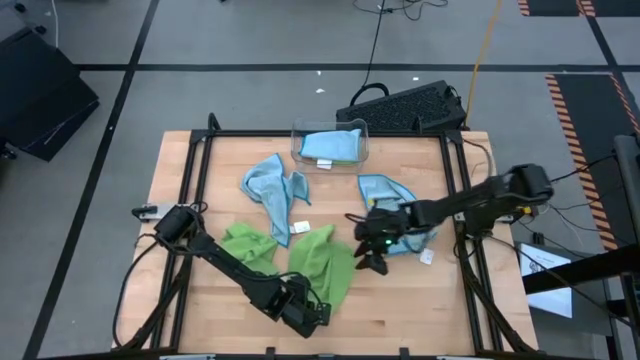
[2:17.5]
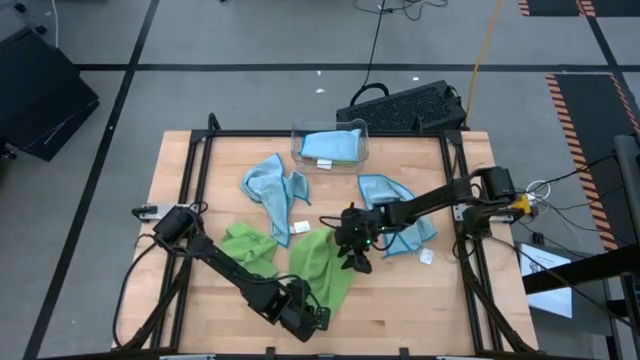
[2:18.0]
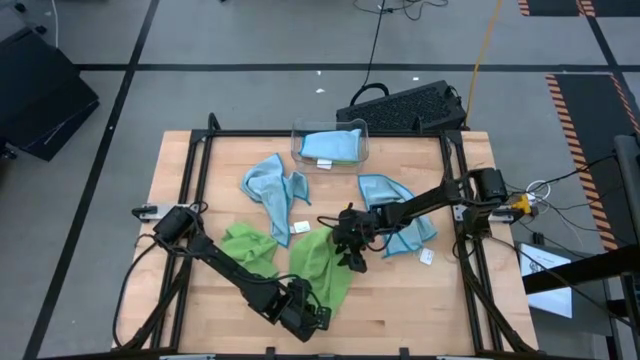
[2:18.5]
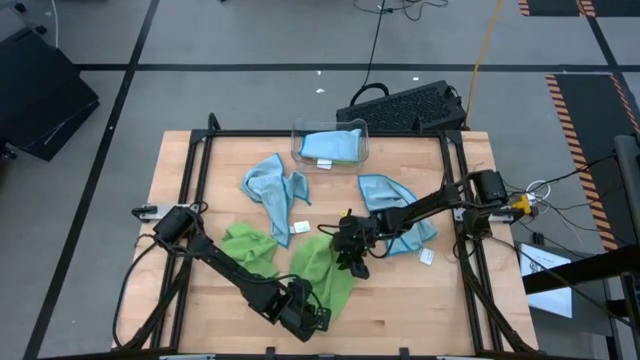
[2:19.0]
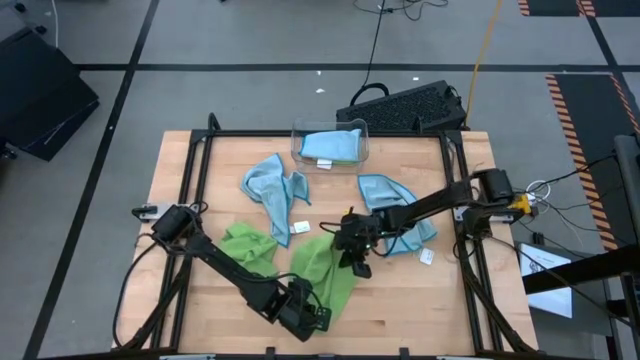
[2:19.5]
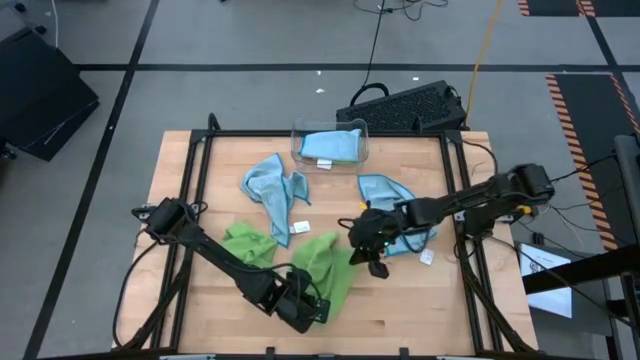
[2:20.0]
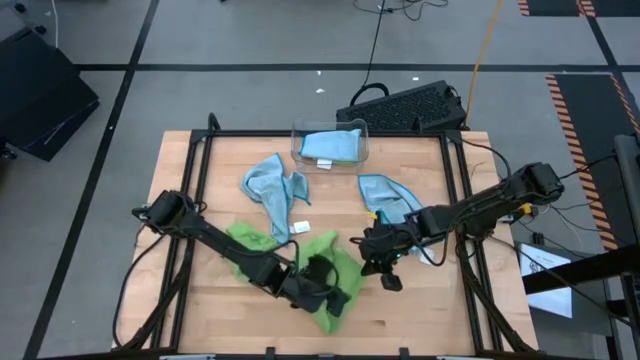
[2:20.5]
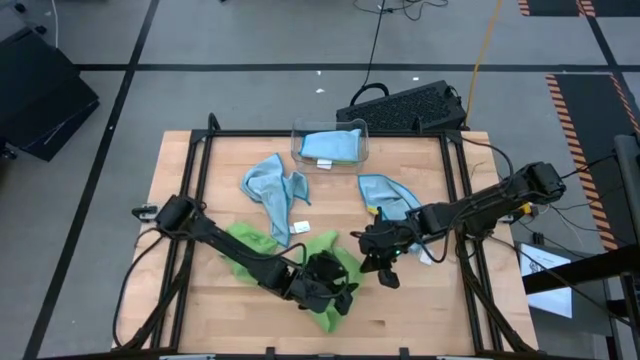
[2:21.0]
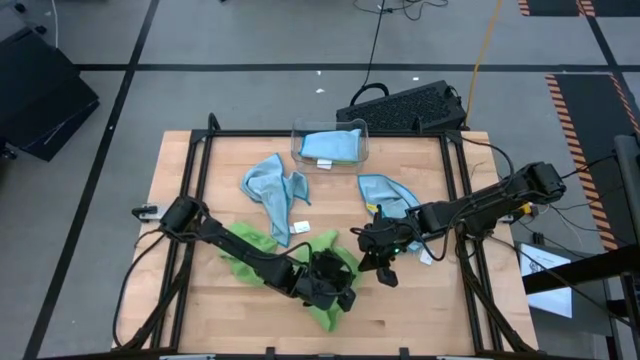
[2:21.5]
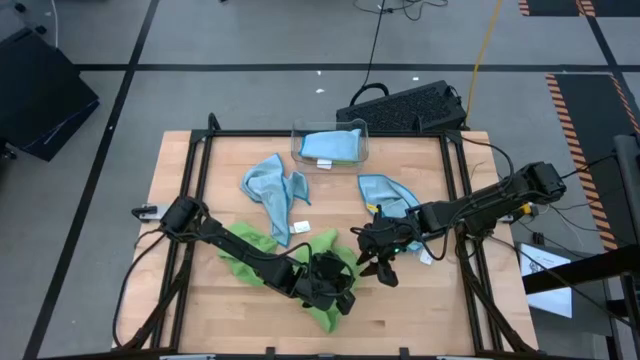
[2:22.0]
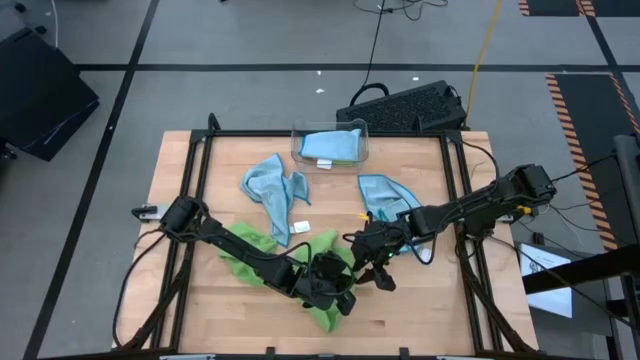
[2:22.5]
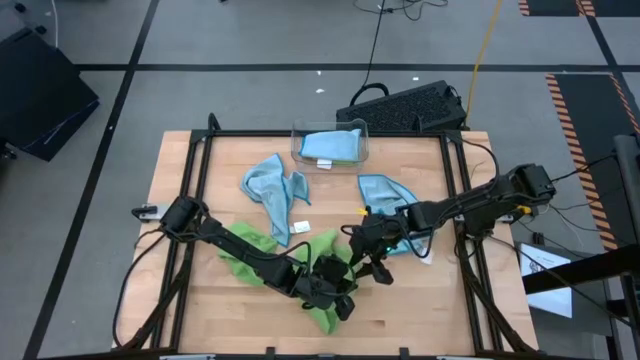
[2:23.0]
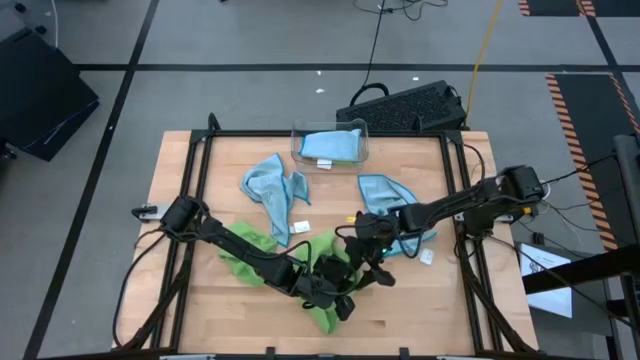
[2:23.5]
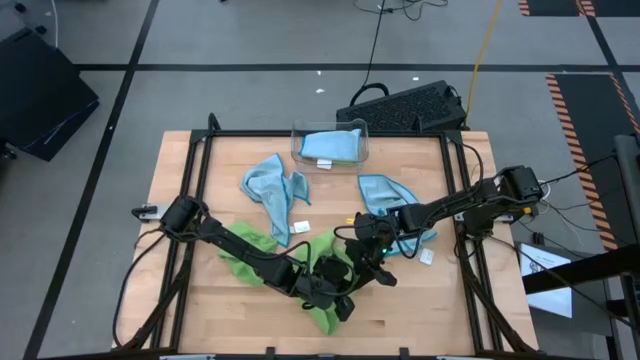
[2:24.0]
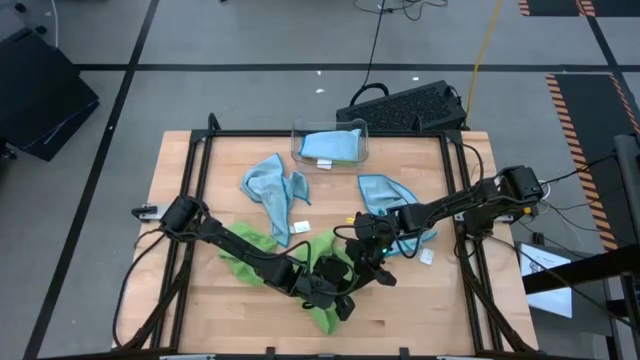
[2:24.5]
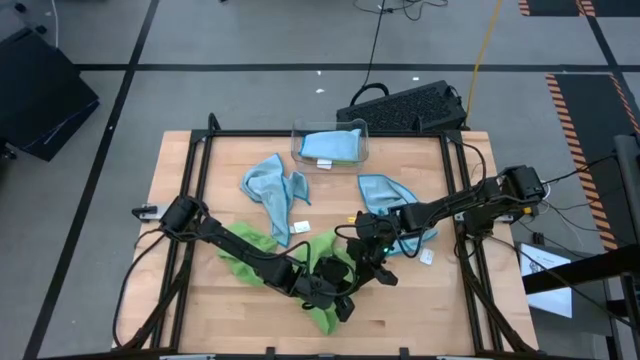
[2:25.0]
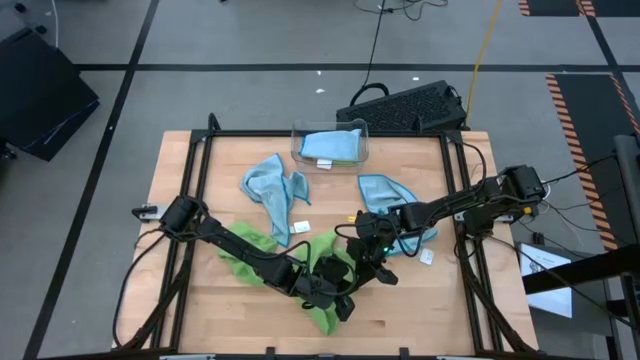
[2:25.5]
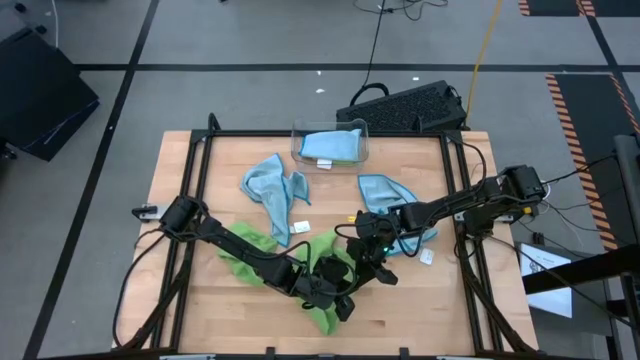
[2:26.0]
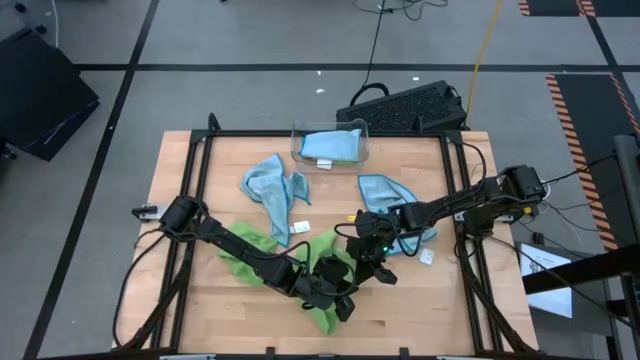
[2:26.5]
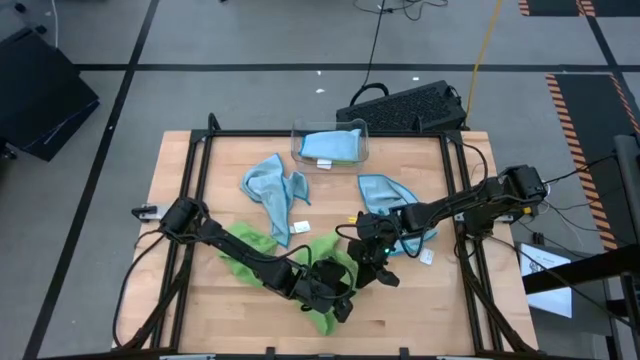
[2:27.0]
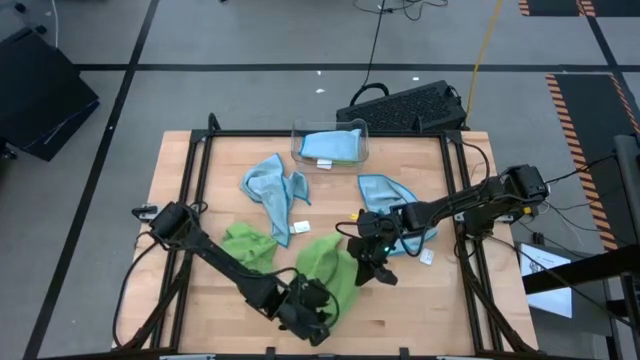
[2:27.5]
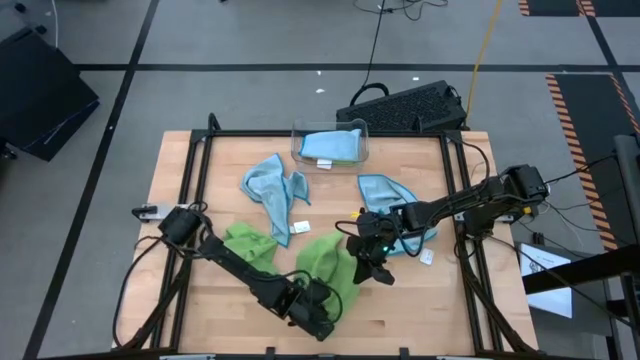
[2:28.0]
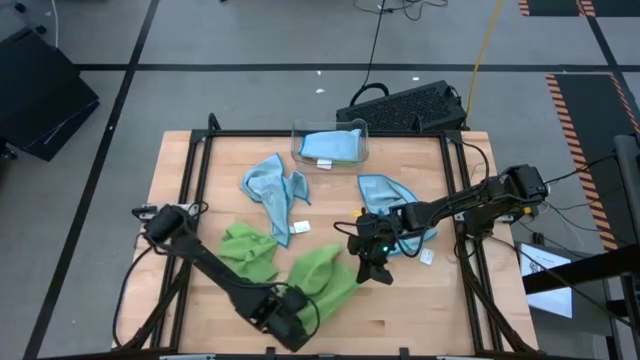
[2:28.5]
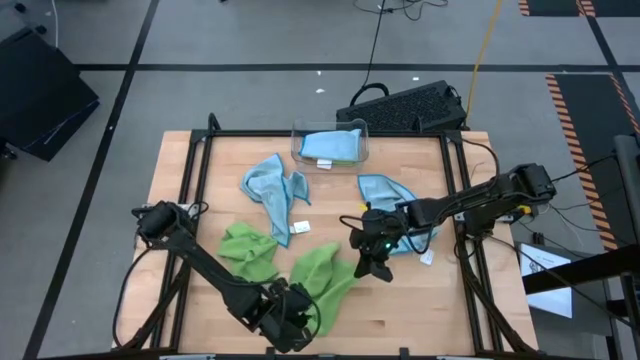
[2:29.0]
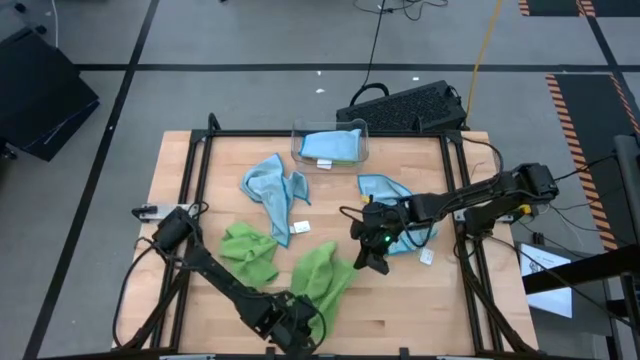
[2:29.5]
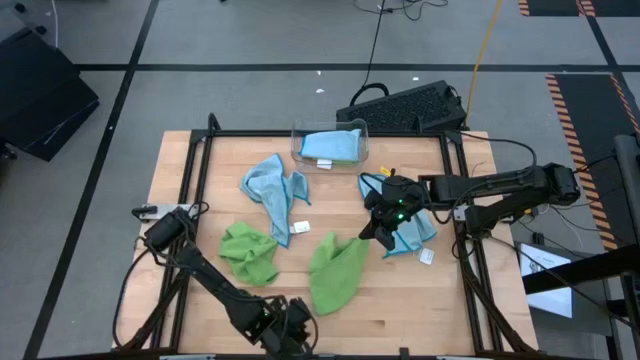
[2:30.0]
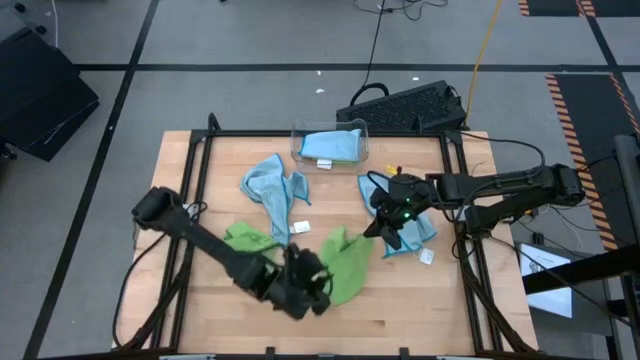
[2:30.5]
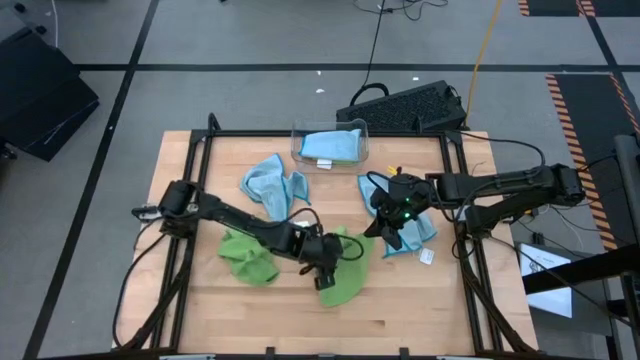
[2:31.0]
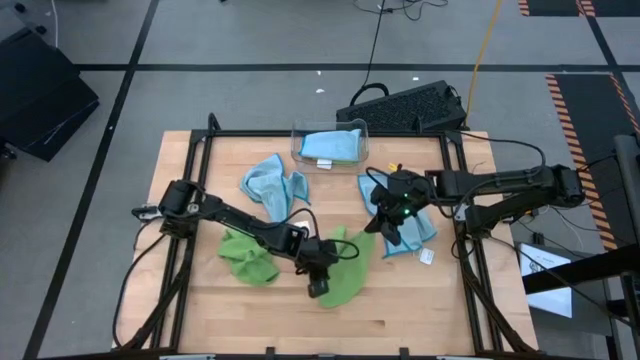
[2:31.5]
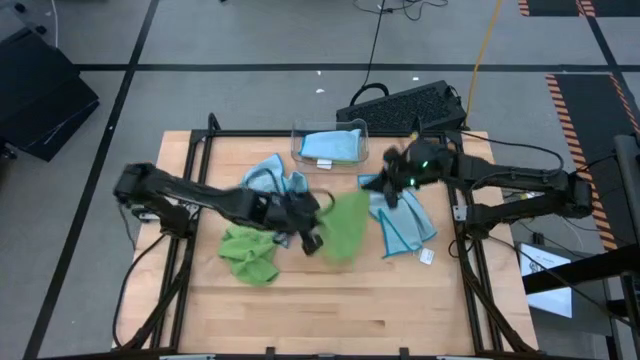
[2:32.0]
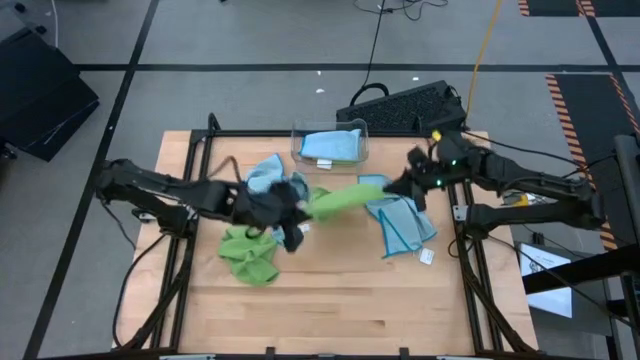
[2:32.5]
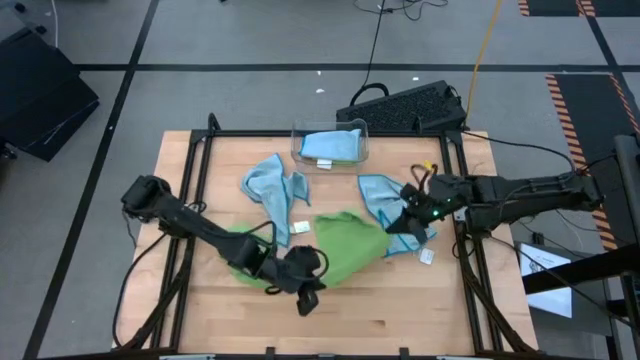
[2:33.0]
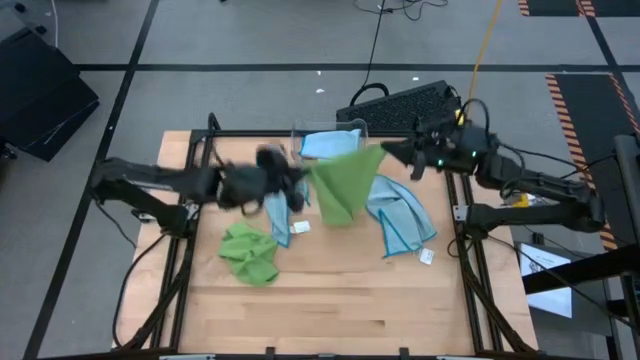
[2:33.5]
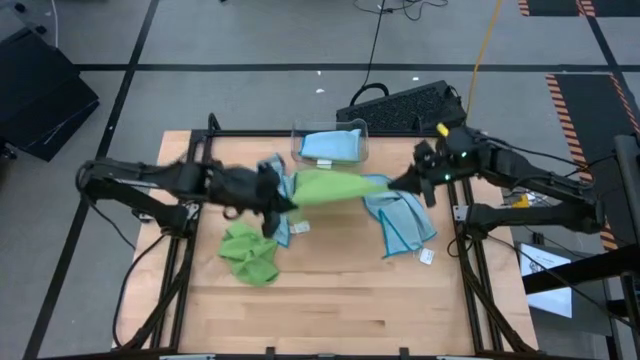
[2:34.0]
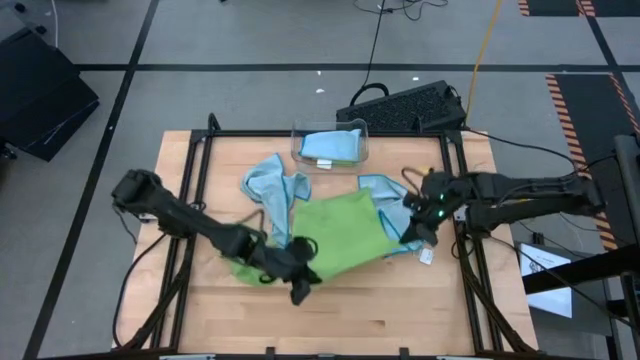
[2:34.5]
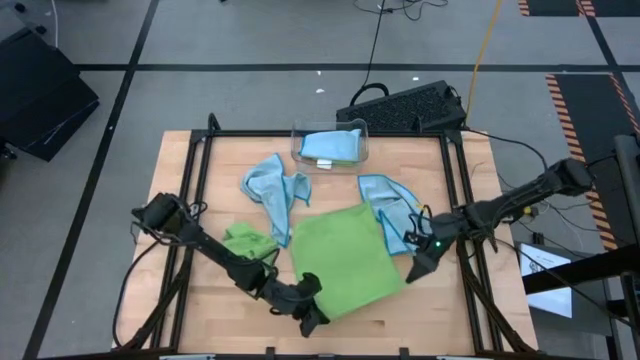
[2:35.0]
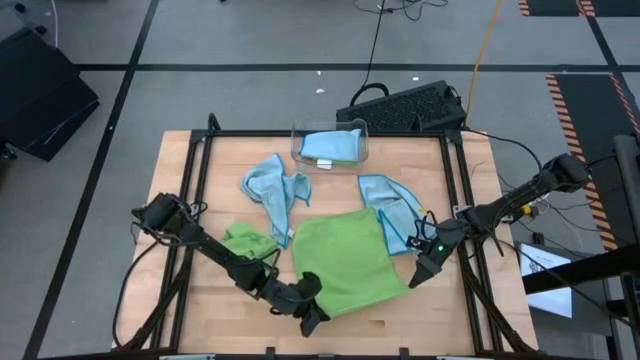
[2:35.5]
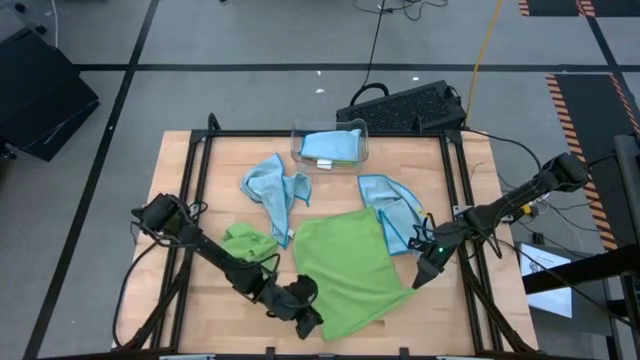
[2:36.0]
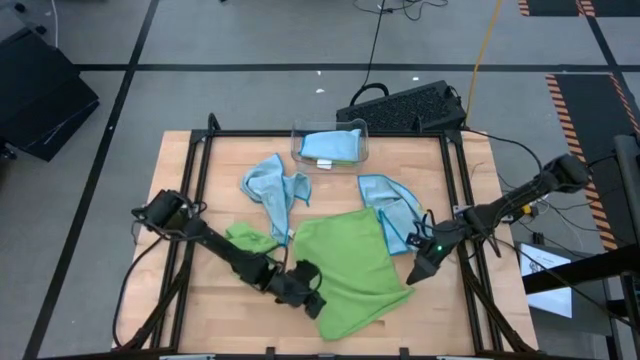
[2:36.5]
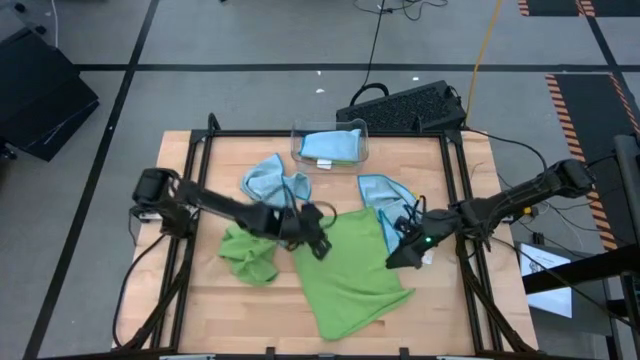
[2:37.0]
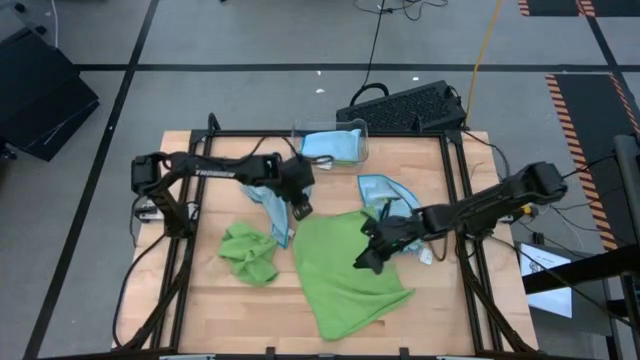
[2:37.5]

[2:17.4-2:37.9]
Task: Fold microfiber towels
Fold the right green microfiber cloth
